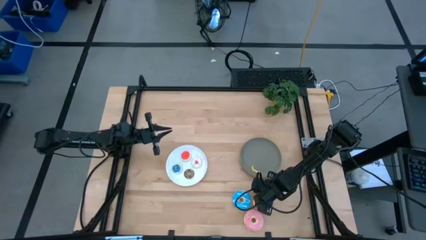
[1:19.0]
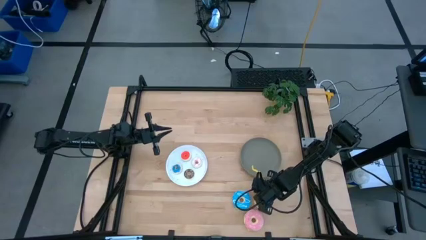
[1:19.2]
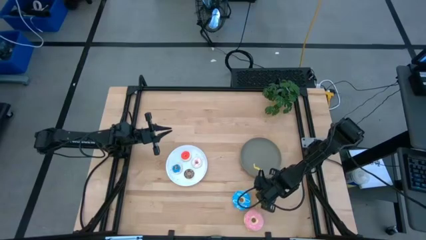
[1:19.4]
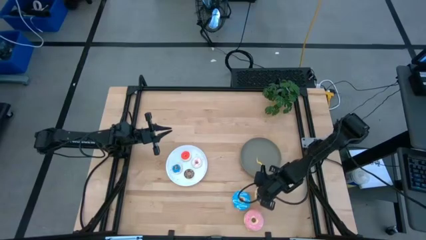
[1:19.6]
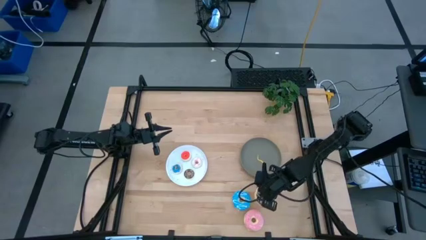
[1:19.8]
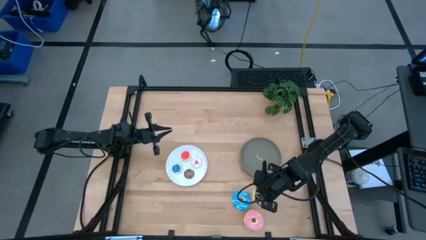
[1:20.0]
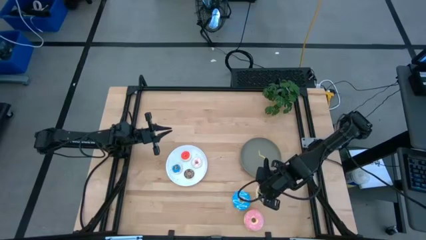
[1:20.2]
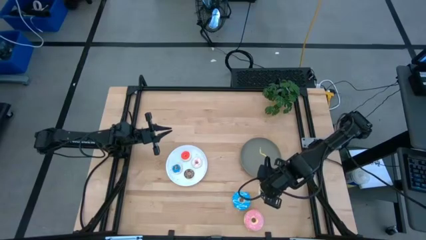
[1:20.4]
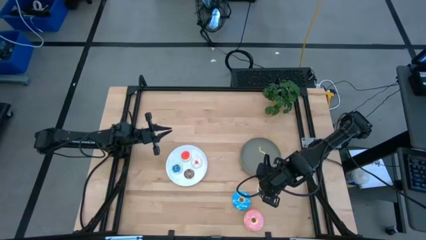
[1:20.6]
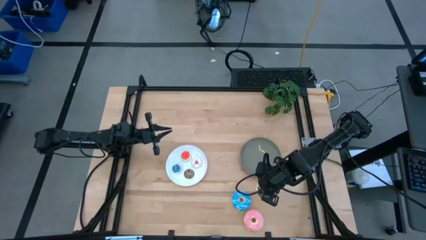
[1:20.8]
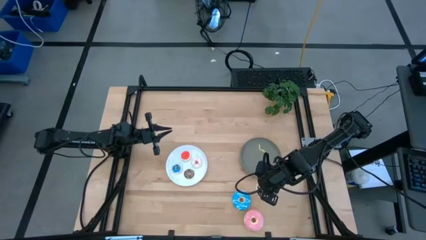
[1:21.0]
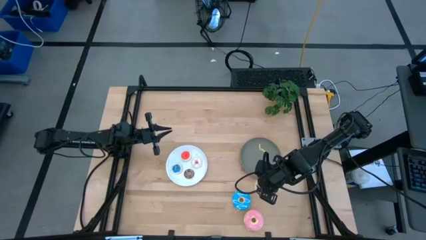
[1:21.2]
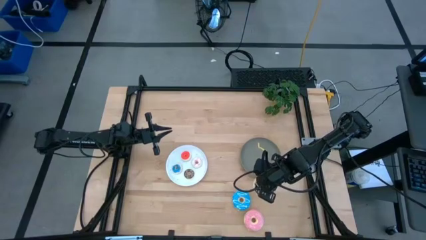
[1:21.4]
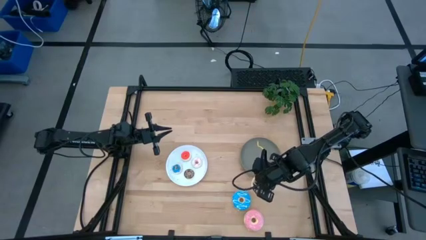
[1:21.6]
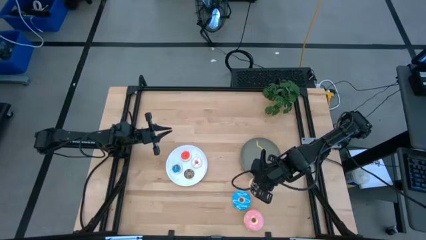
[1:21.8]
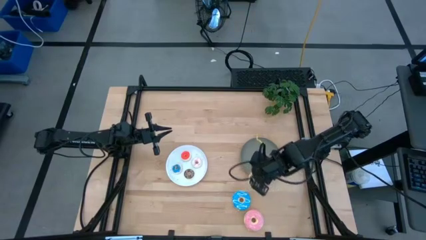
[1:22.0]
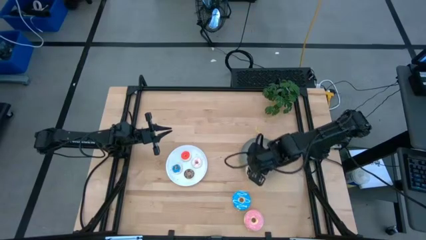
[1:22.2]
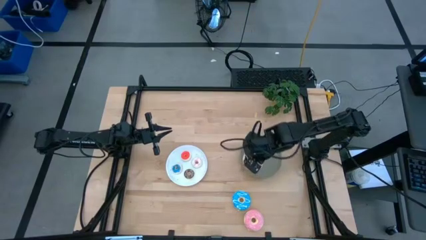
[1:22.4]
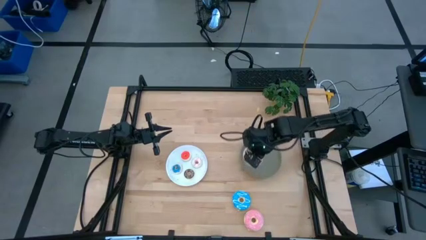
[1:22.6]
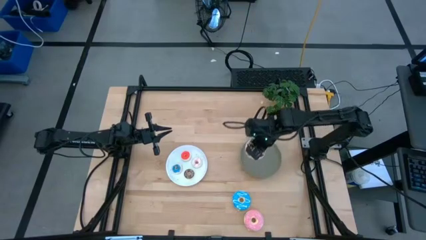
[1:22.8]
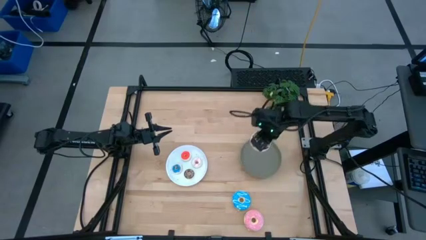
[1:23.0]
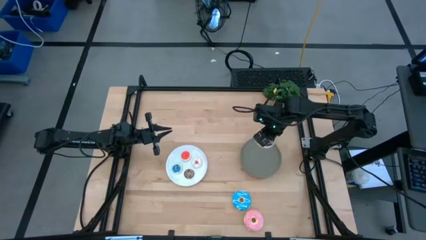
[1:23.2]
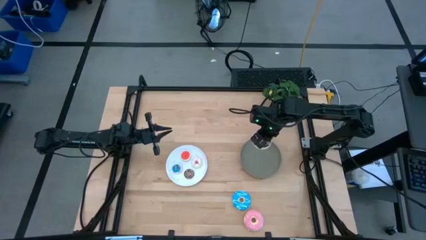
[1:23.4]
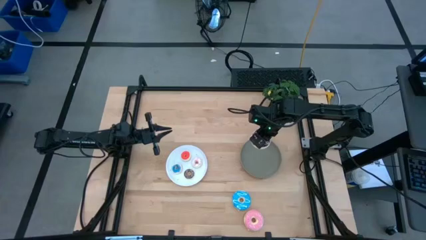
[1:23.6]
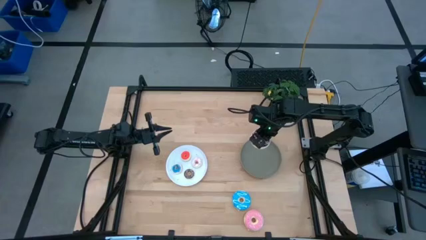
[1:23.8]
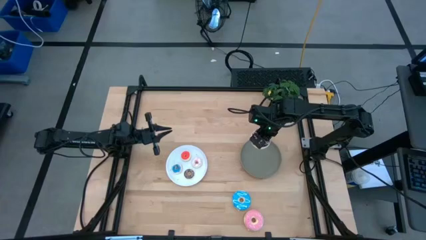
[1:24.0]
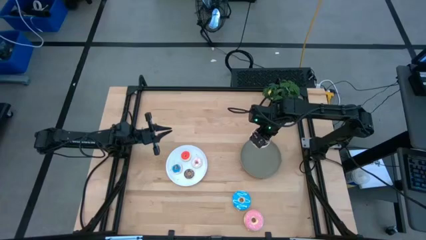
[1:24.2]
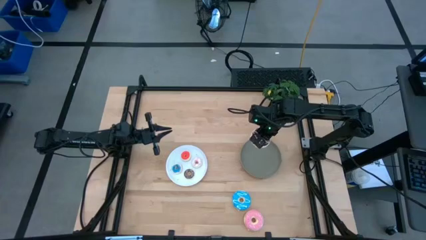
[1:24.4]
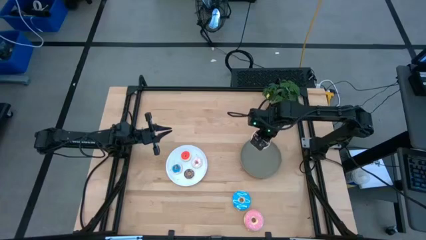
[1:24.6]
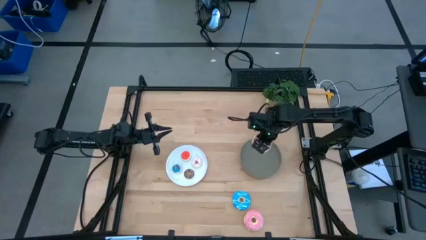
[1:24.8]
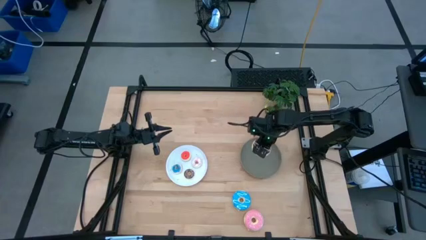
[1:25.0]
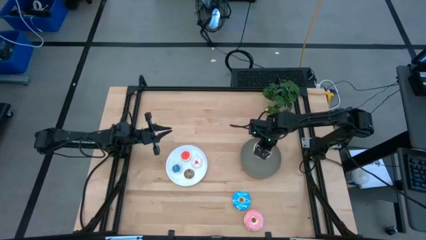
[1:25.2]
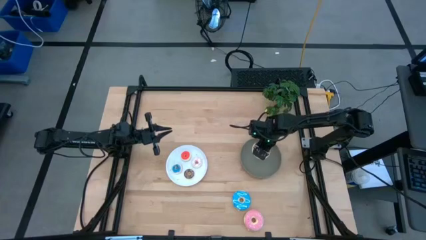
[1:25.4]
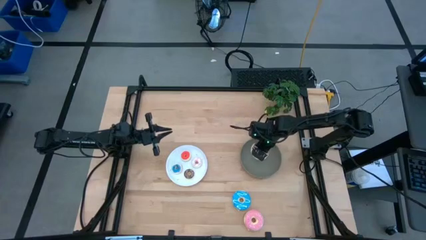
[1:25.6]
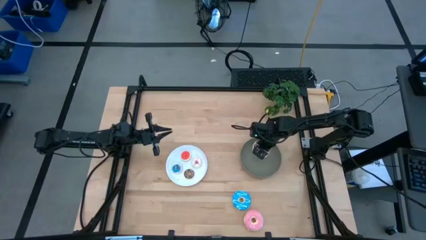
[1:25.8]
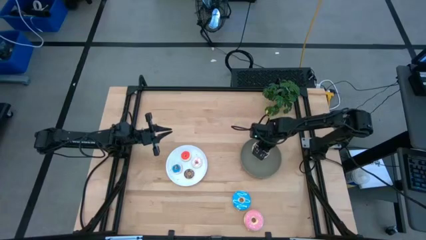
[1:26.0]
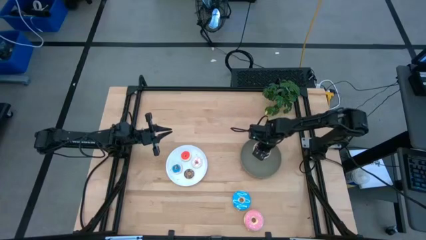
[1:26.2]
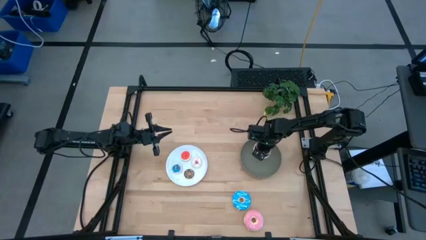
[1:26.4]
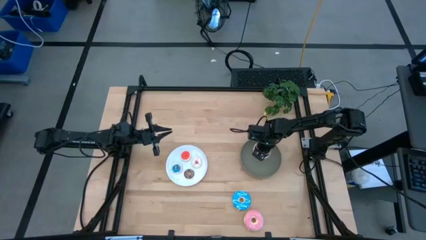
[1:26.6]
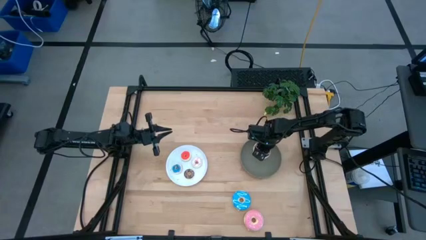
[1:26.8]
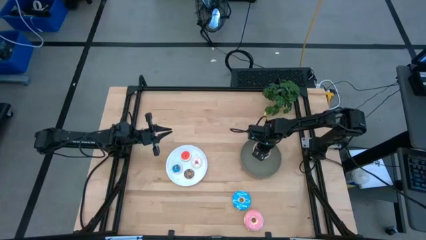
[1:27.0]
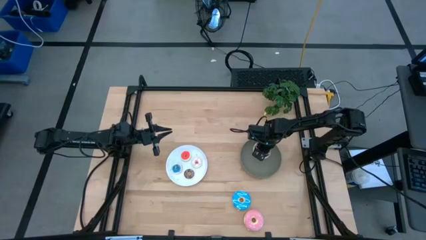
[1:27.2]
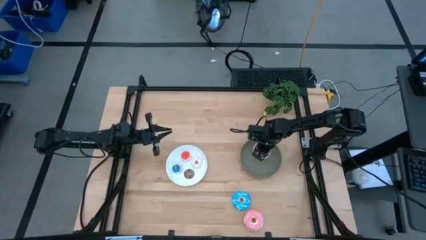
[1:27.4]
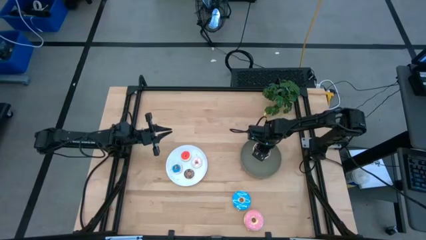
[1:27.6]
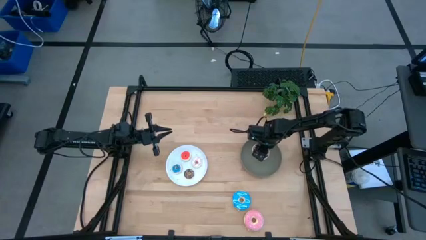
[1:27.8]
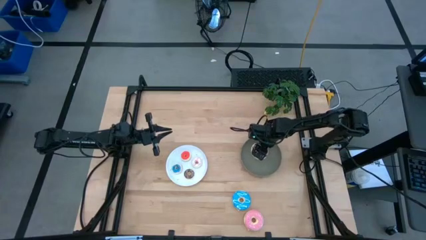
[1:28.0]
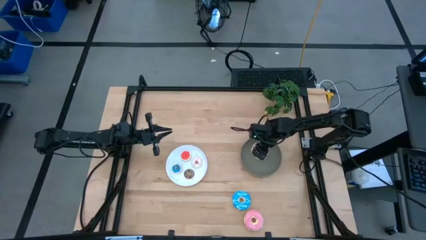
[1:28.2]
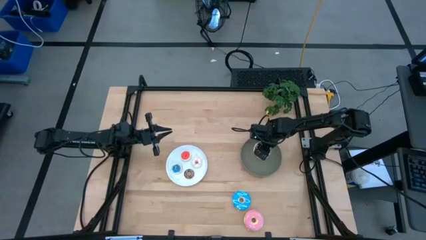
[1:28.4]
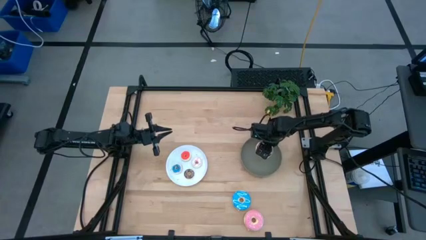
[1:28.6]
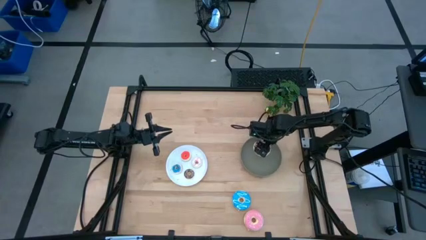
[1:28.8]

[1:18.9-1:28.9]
Task: Pick & Place donuts
Put the large black donut on the gray plate

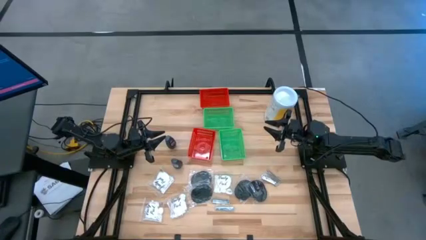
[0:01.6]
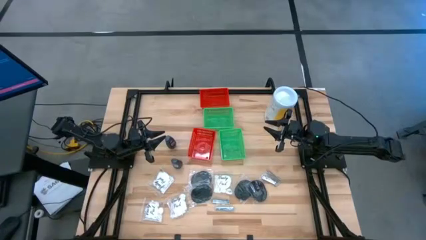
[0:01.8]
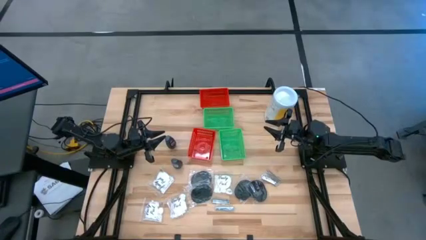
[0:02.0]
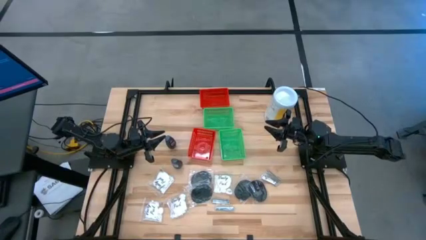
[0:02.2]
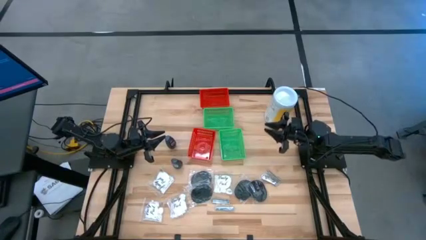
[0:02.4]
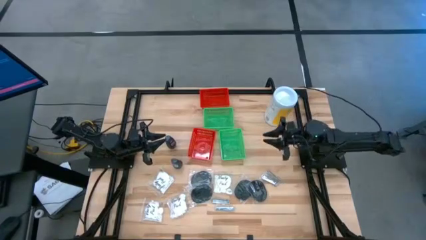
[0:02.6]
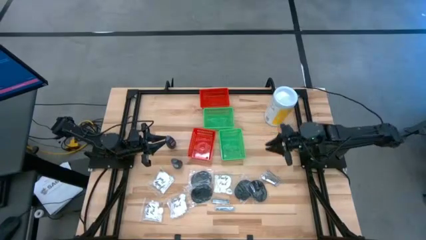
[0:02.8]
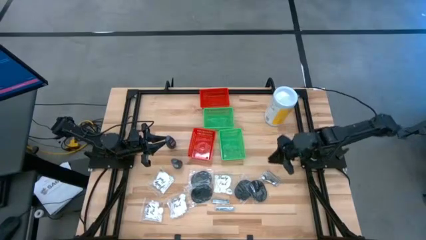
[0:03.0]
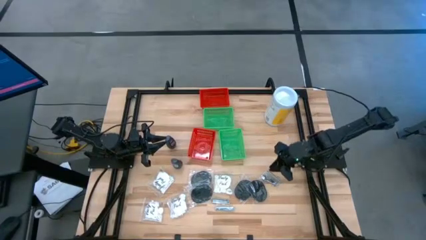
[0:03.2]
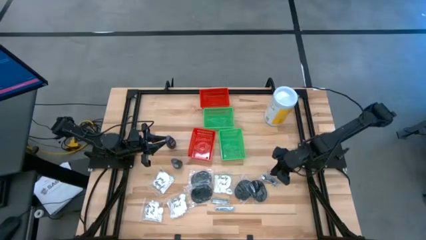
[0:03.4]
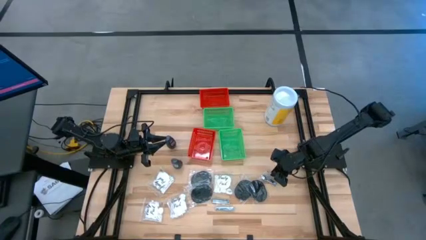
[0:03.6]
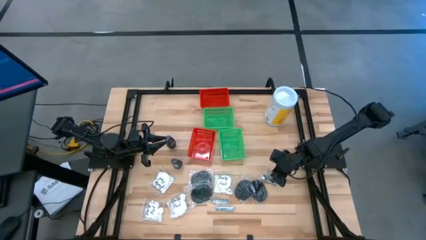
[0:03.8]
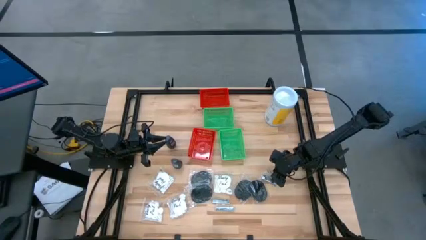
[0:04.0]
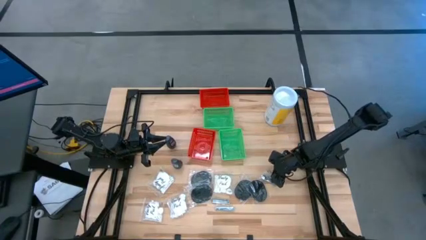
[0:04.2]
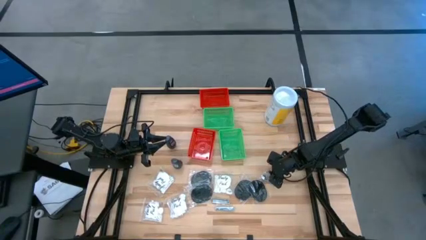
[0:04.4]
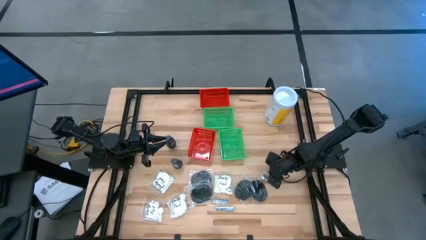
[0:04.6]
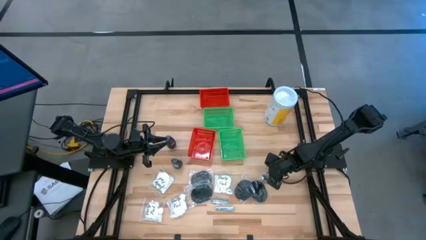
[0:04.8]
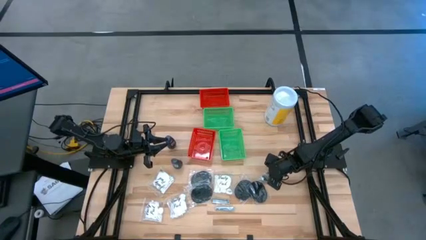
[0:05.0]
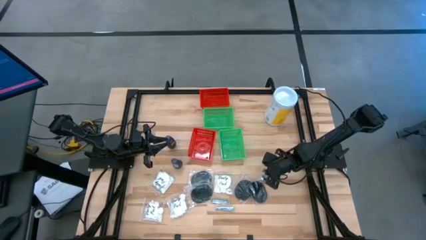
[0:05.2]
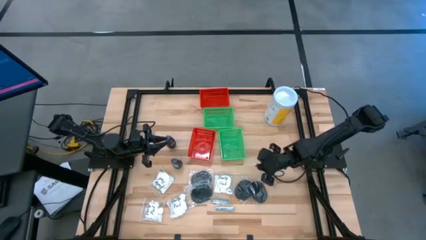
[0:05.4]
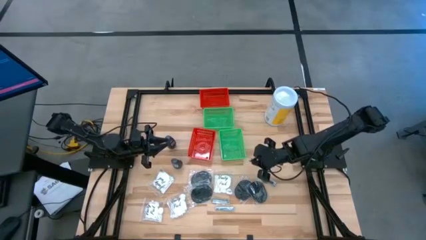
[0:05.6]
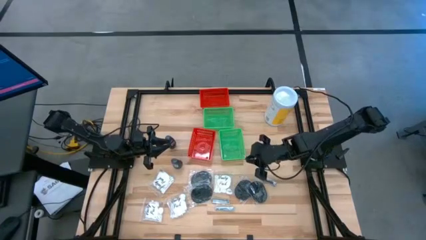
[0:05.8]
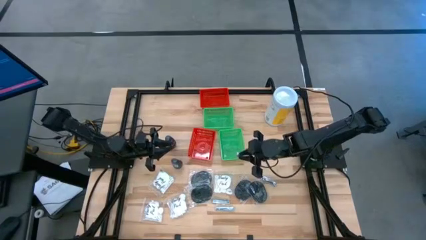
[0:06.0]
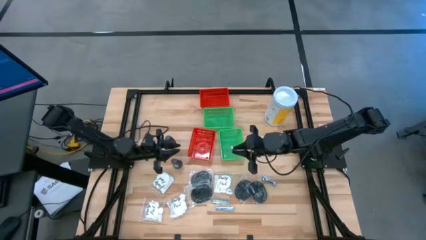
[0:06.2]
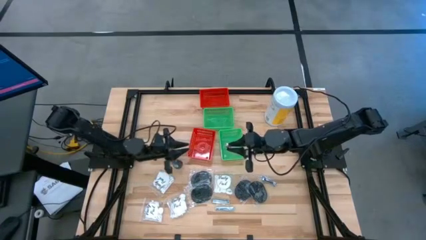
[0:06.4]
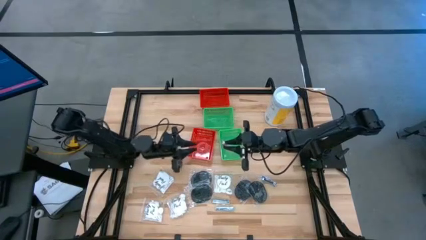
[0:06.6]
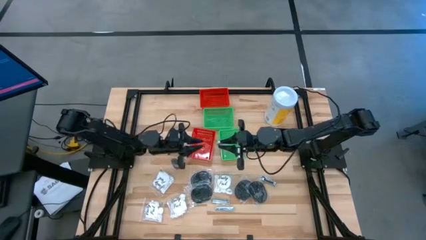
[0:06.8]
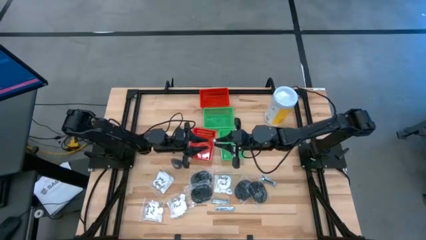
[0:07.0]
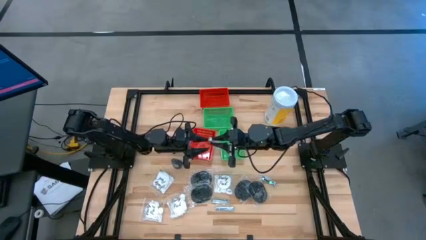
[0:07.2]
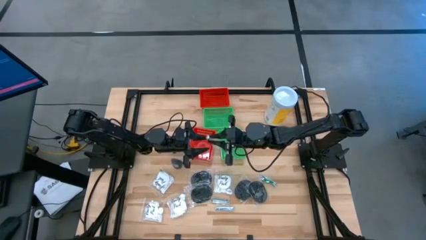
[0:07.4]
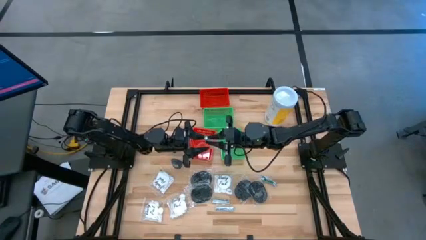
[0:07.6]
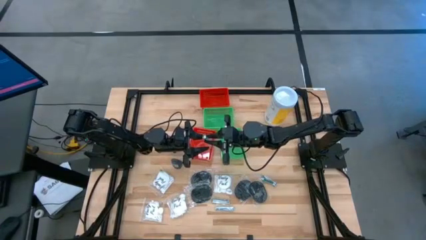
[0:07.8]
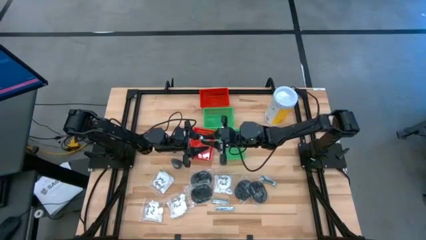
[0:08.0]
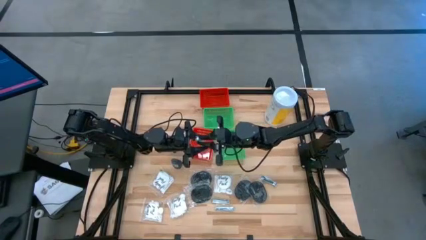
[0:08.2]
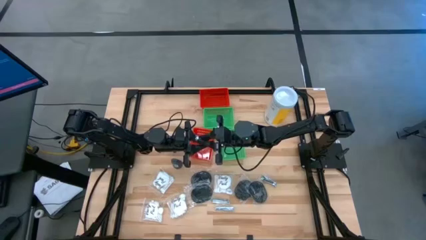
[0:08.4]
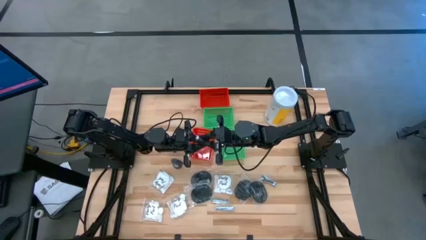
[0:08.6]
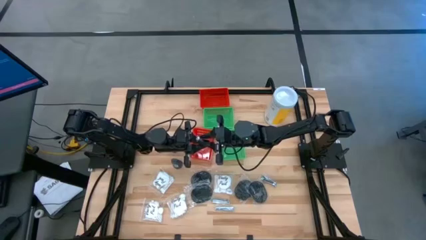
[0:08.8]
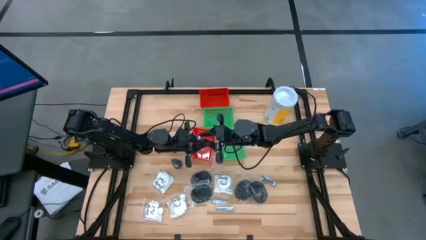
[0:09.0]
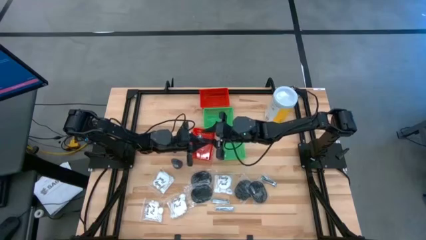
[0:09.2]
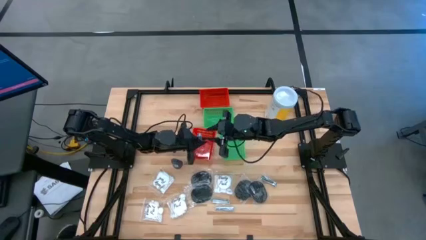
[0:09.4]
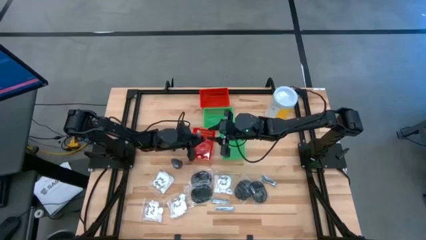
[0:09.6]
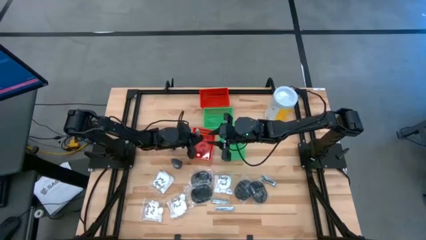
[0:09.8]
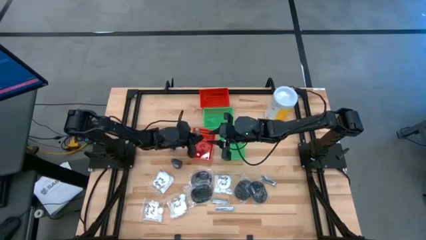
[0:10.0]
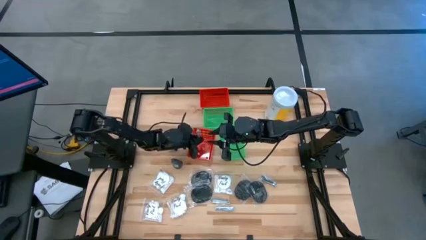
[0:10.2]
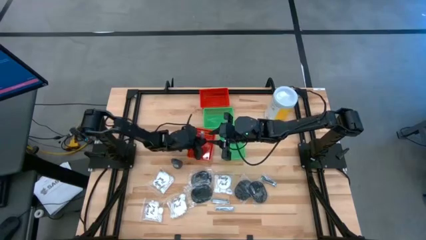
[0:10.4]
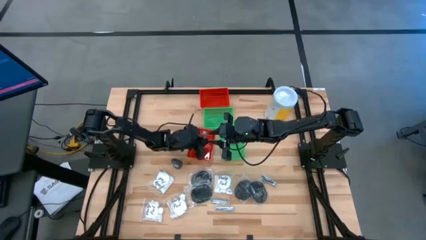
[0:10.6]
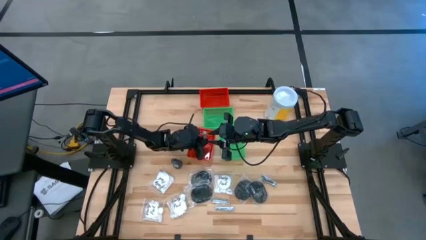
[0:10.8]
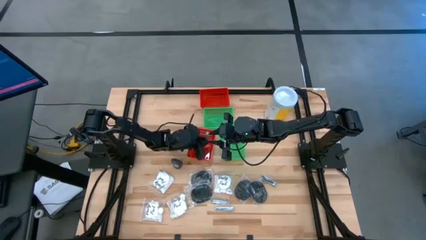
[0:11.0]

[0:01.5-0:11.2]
Task: Pick & Place Travel size toiletries
Put the silver nail cutter into the bottom red bin
